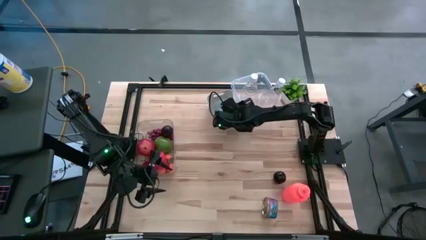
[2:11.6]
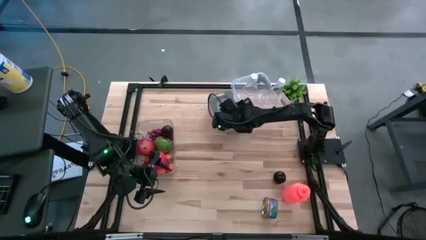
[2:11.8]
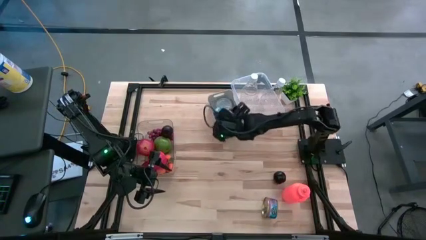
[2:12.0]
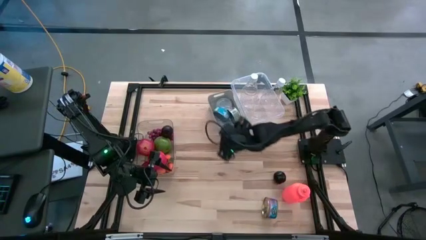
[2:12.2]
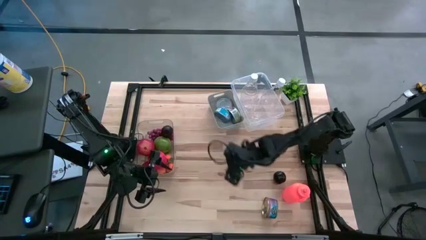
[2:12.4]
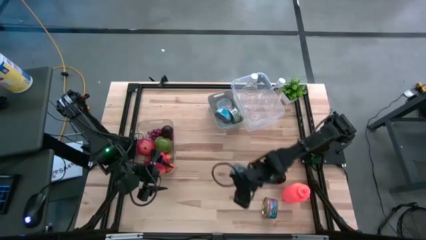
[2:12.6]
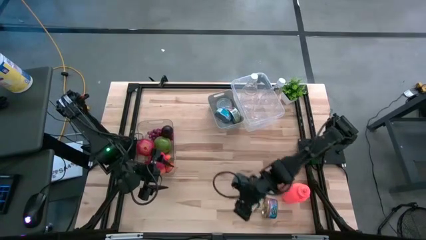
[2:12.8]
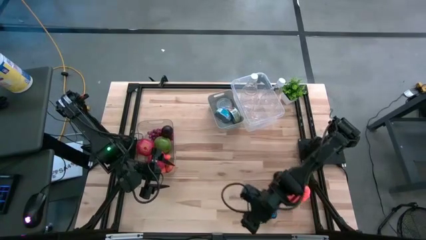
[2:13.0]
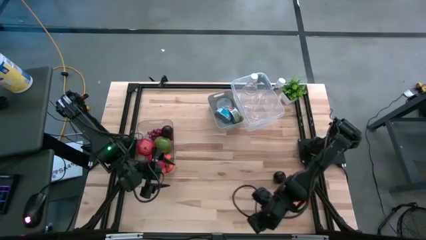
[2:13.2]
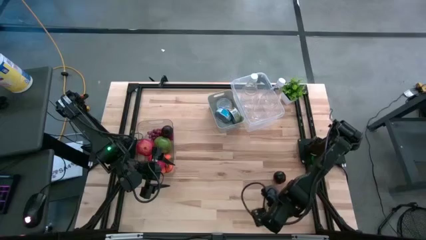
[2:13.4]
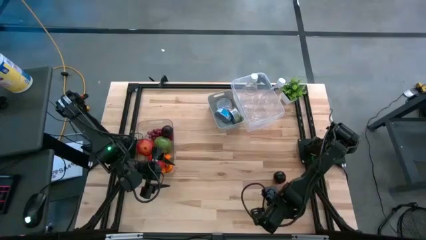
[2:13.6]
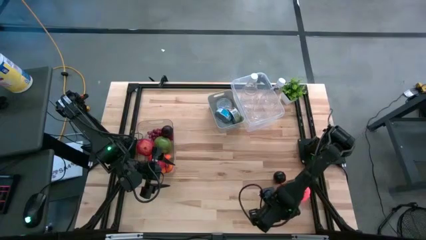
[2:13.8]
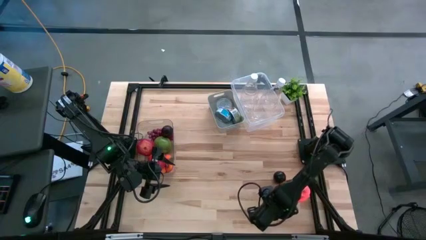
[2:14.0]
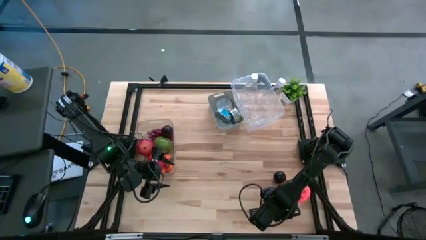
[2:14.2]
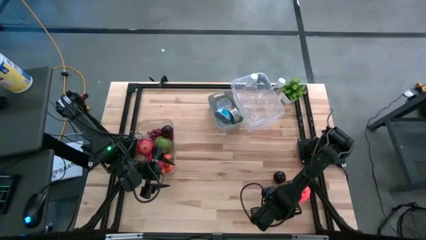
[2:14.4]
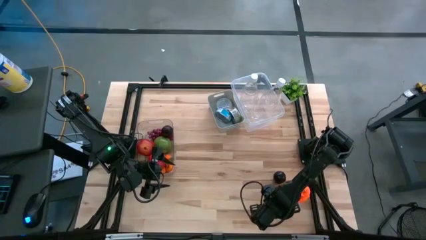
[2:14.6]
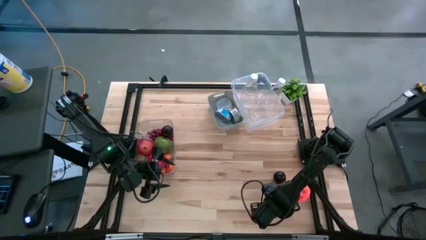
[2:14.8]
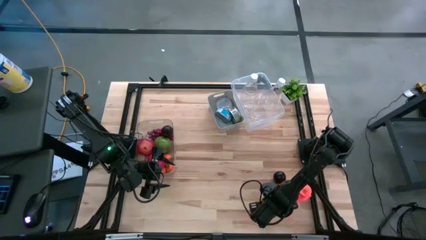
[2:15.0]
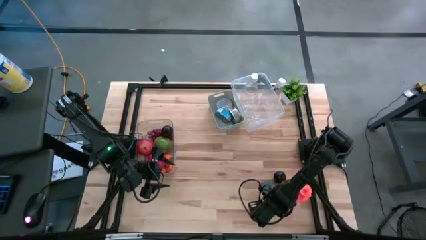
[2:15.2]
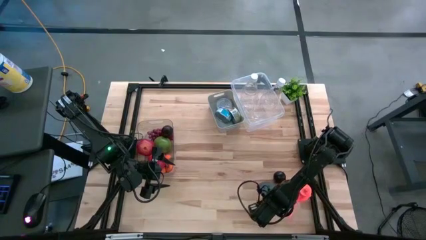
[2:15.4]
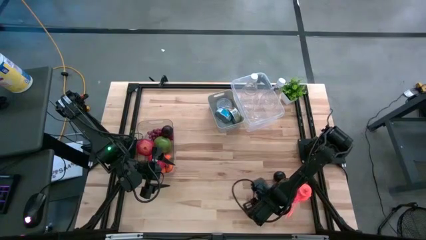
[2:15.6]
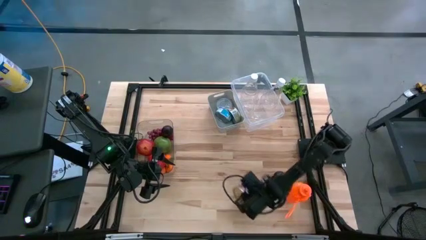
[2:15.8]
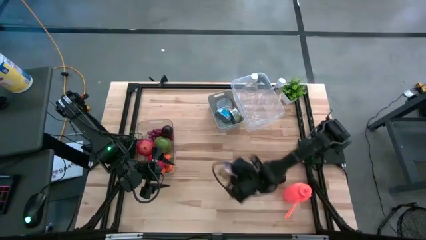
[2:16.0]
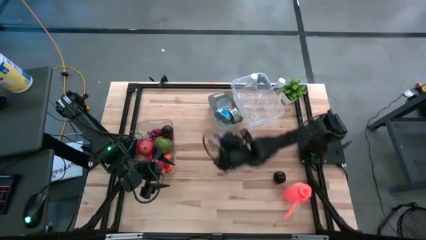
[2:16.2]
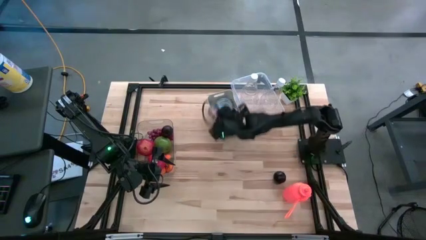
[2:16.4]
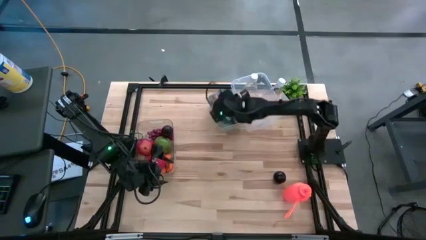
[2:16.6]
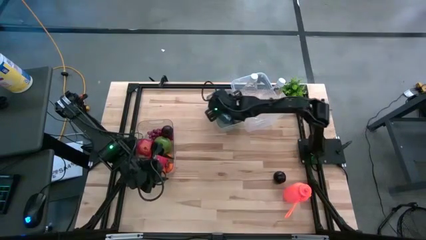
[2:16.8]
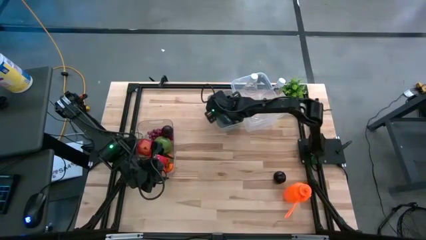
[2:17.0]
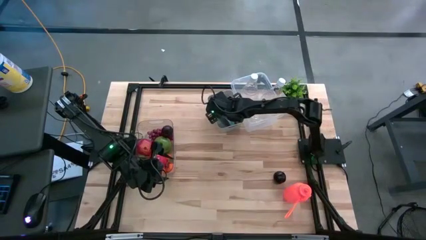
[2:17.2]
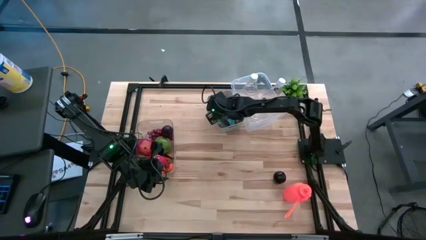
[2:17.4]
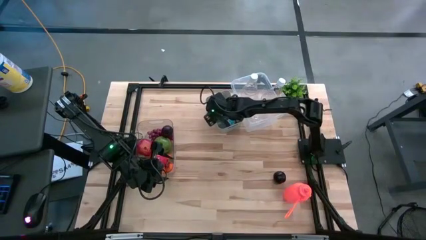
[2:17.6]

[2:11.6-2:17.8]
Task: Pick & Place Food Item
Put the blue tuna can into the white bin

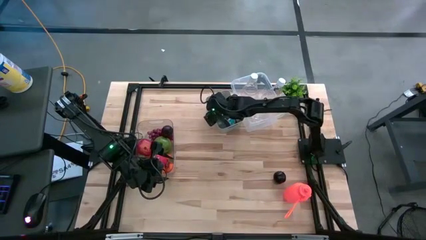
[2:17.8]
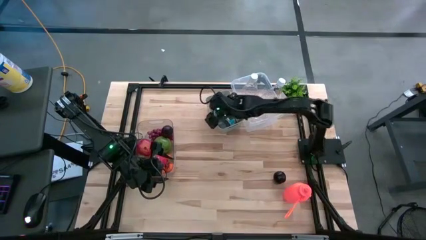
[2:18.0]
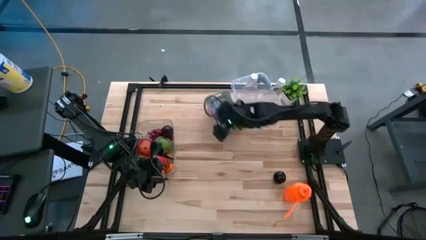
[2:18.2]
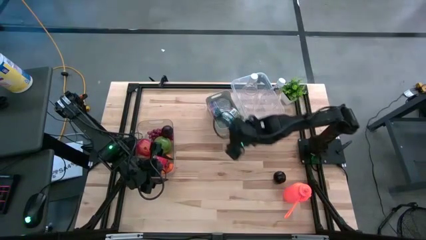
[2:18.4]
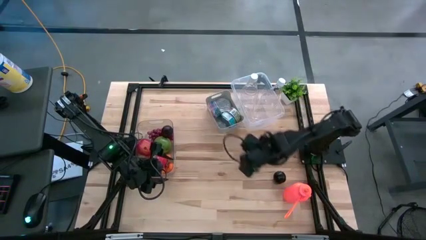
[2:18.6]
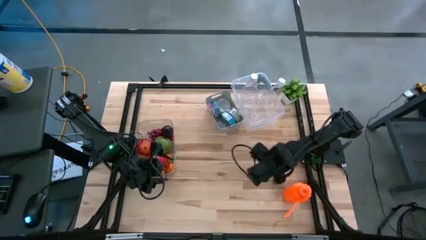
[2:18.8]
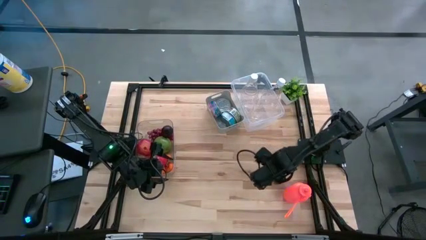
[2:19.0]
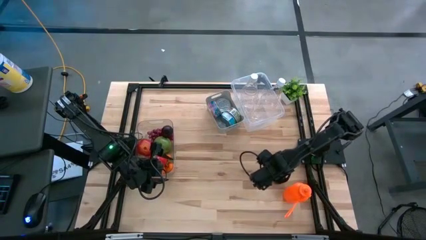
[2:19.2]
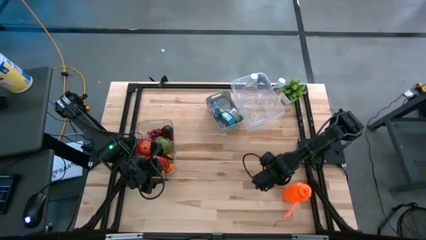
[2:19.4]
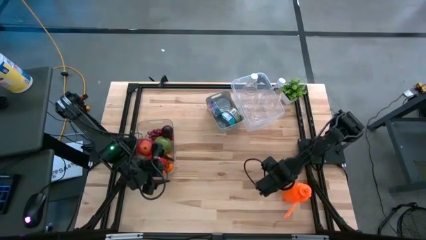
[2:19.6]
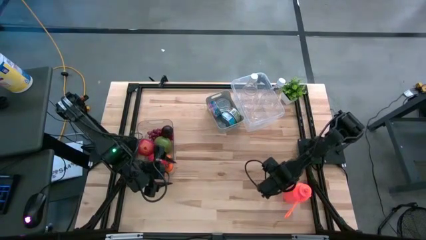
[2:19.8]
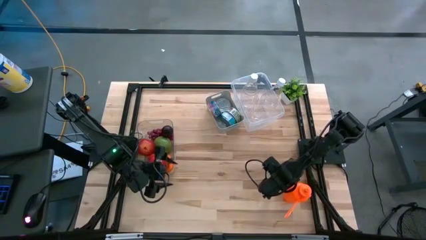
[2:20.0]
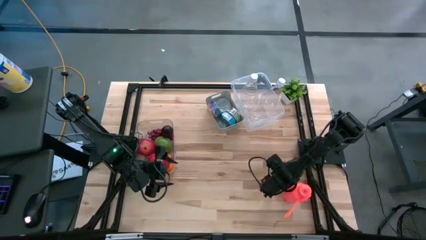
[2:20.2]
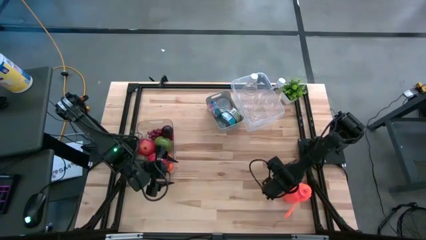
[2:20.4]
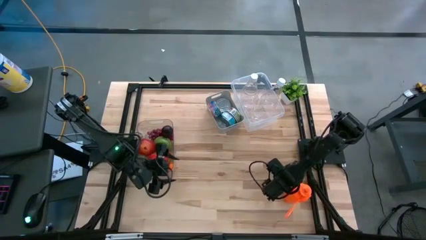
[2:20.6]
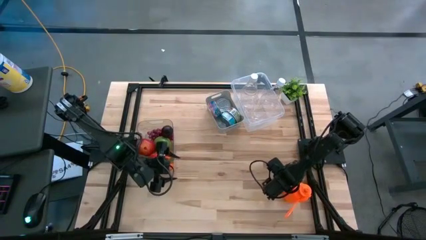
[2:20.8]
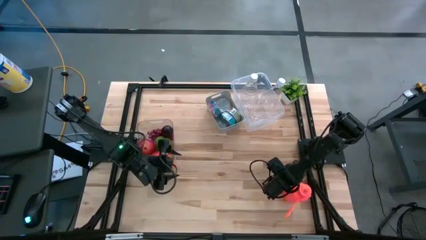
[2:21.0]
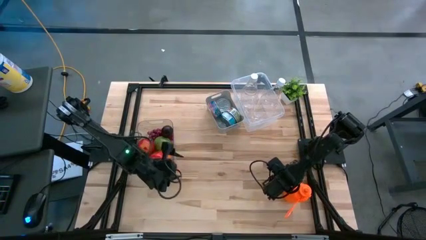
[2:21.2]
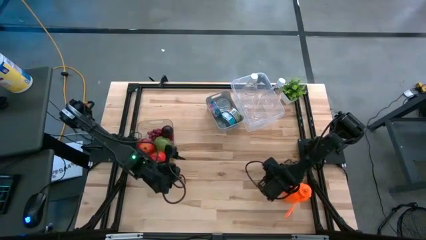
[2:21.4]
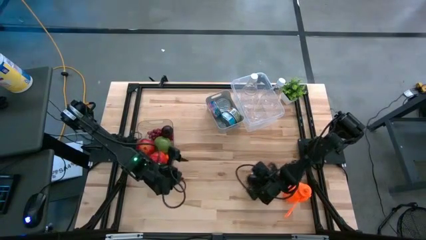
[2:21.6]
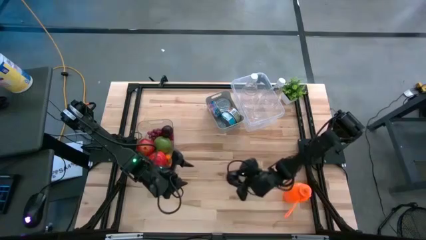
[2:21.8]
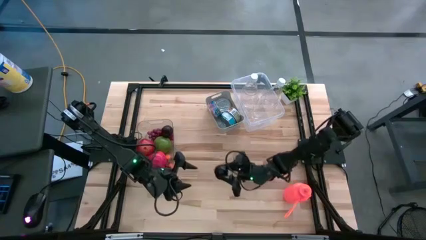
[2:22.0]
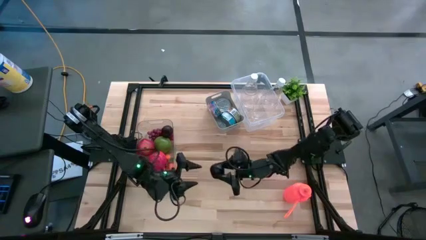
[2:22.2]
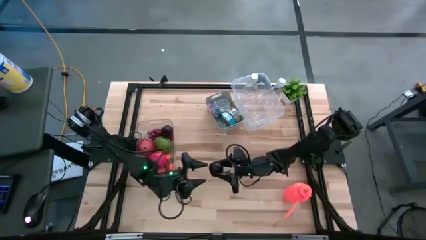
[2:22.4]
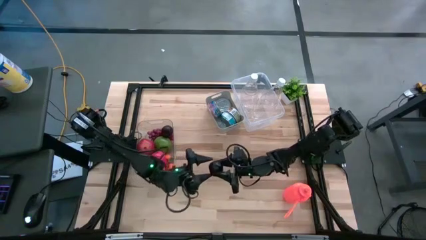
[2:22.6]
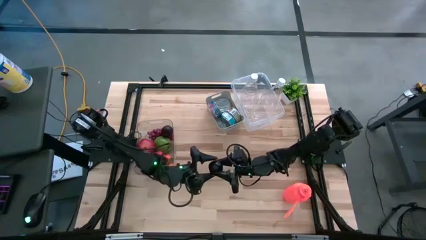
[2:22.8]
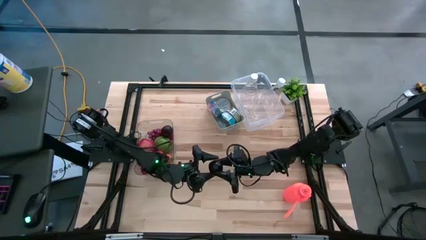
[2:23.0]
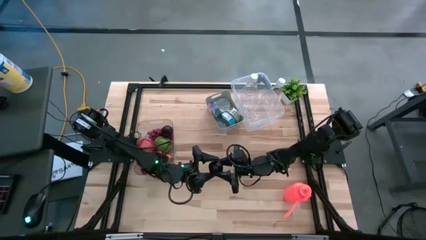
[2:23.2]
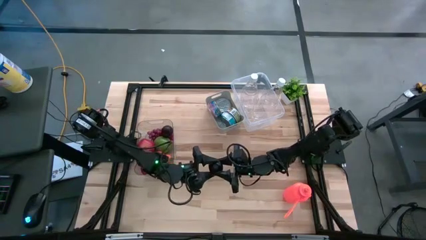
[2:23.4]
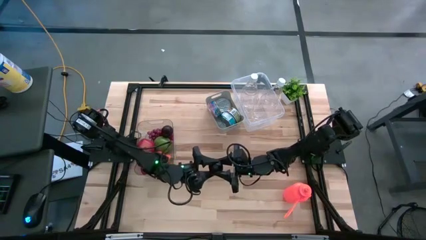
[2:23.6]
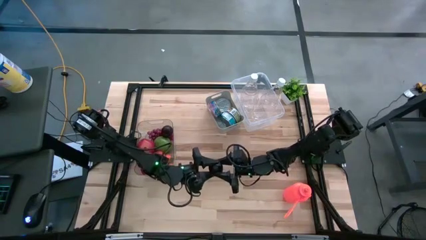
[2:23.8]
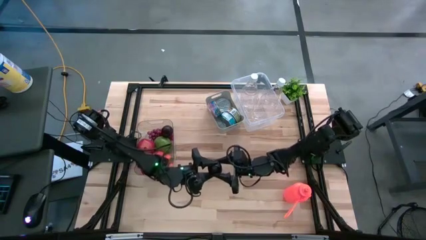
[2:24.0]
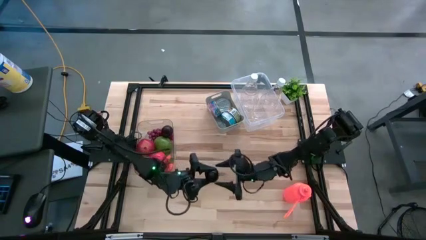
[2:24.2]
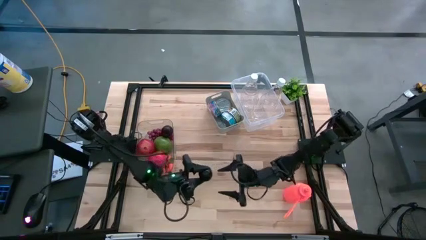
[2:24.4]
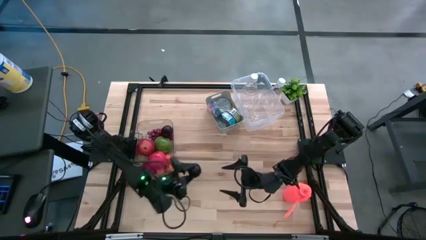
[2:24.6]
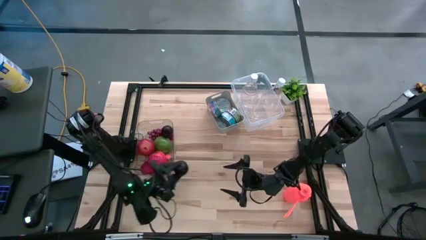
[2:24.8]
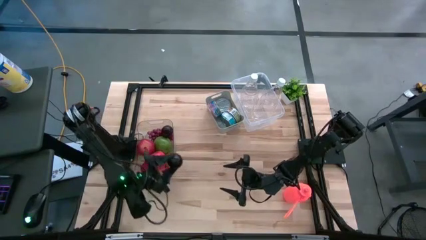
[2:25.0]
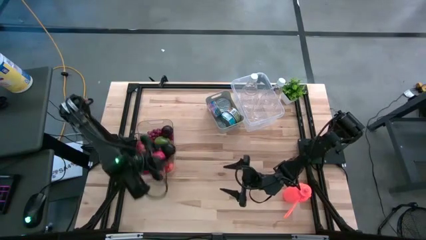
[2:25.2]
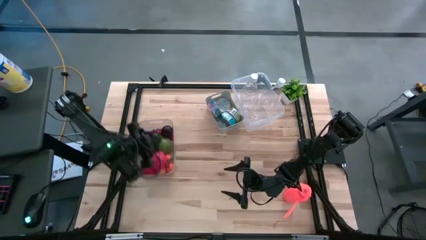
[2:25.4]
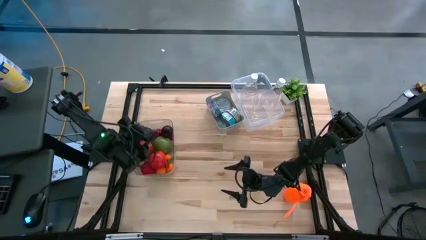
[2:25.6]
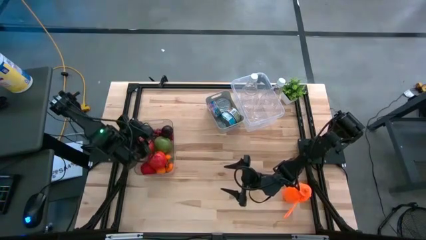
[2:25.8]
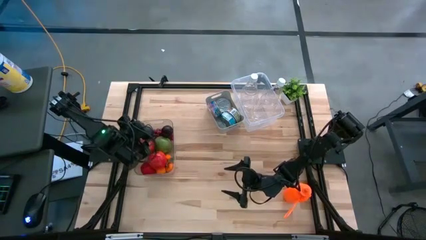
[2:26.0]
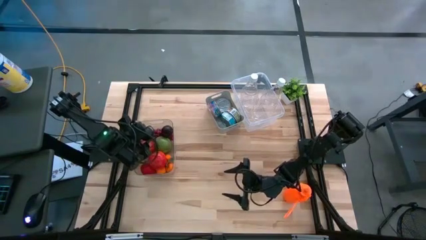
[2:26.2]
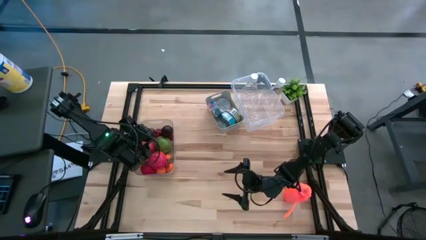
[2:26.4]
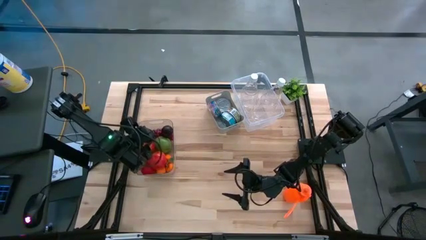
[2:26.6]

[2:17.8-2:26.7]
Put the black plum into the left transparent bin

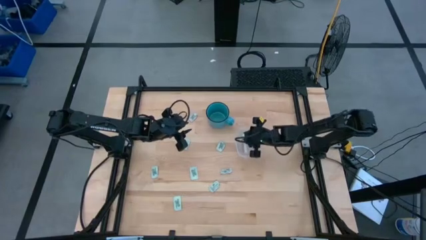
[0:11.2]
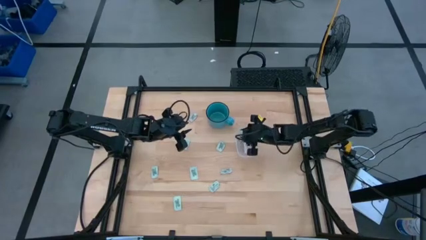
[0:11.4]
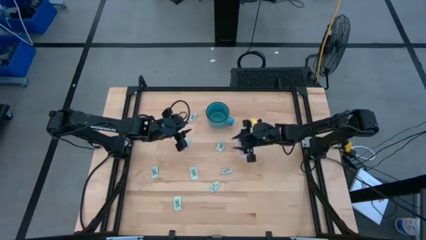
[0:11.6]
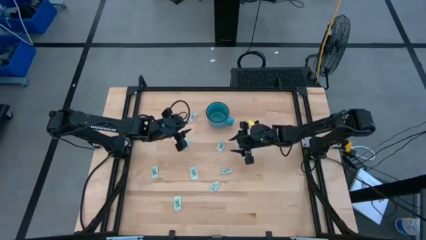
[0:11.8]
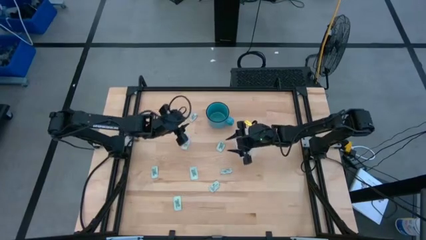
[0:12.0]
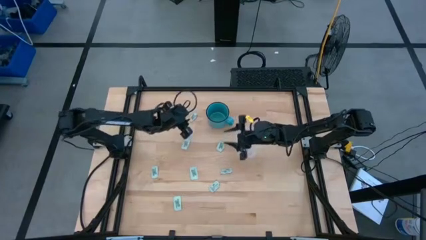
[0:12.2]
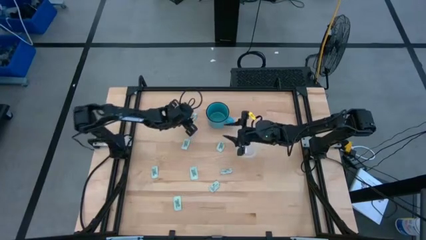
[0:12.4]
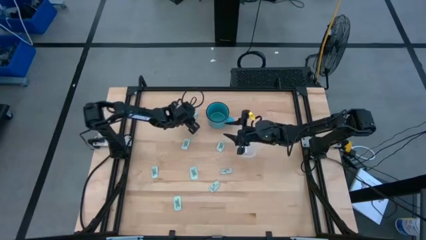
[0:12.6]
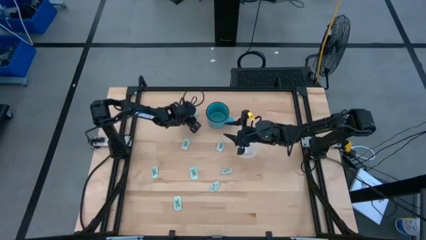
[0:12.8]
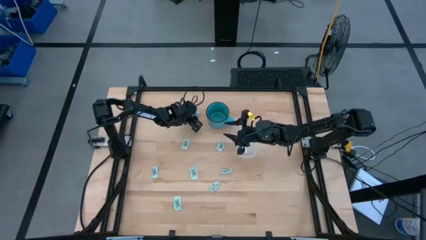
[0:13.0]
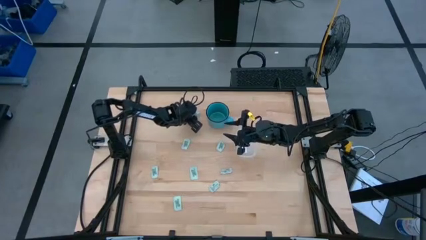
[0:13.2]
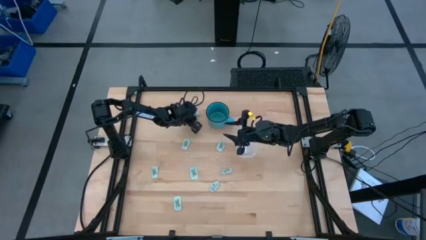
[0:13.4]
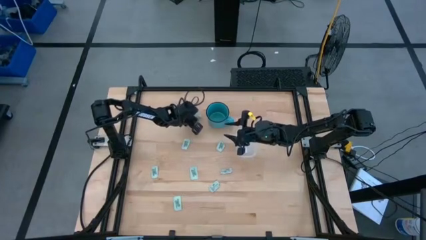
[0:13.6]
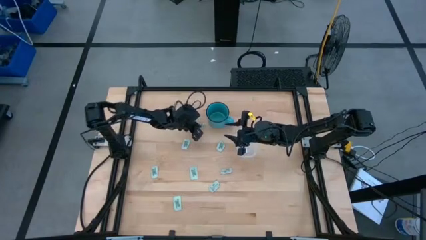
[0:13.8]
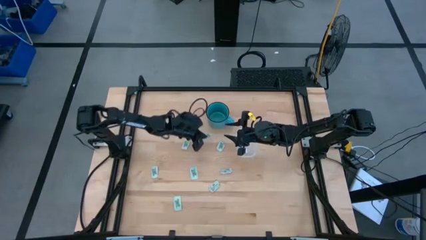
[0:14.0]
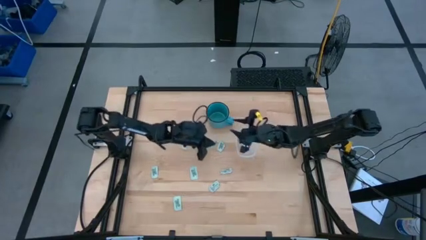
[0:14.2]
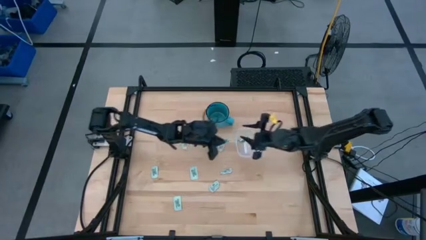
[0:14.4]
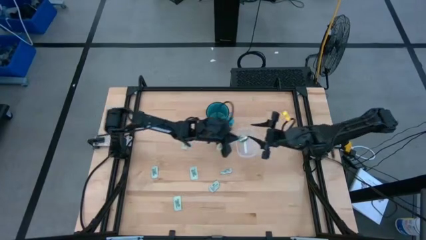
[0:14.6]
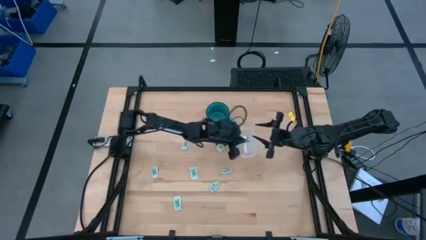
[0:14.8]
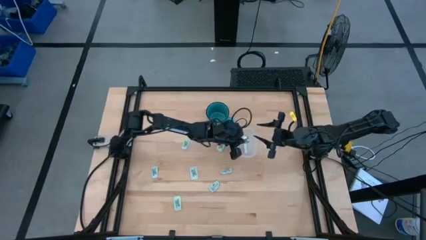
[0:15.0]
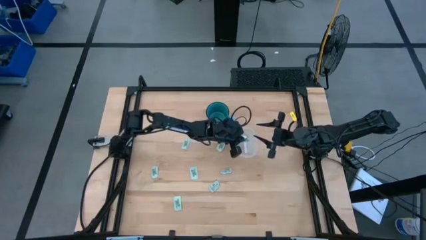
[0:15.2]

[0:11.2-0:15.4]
Task: Pick and place Stevia / Truvia into bins
Put the stevia packet into the transparent bin
